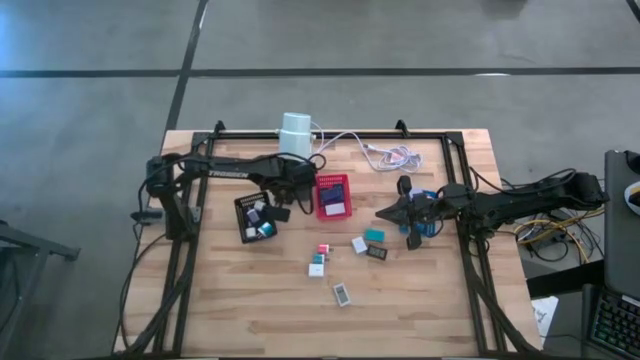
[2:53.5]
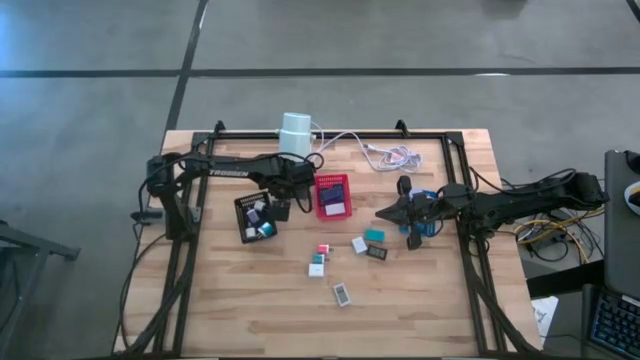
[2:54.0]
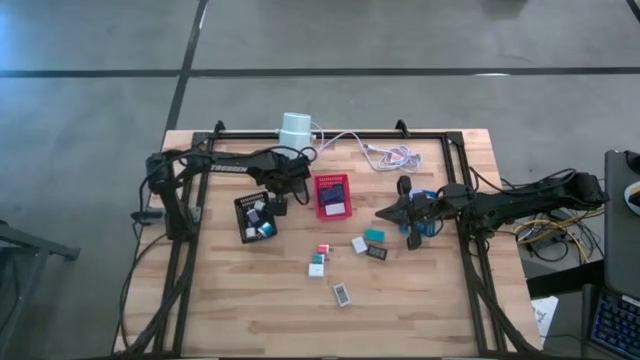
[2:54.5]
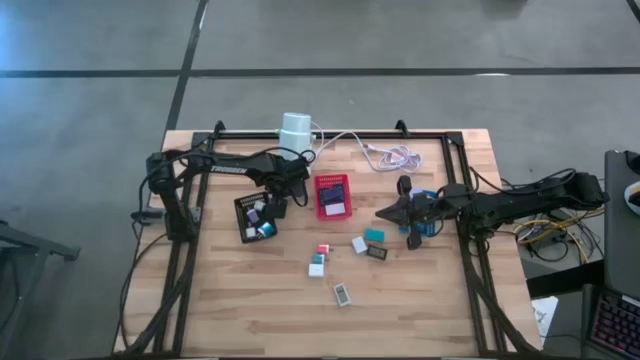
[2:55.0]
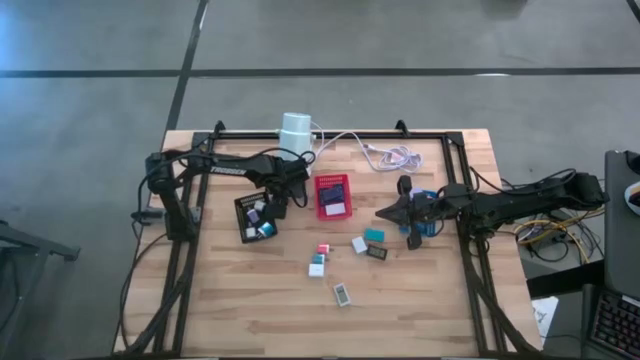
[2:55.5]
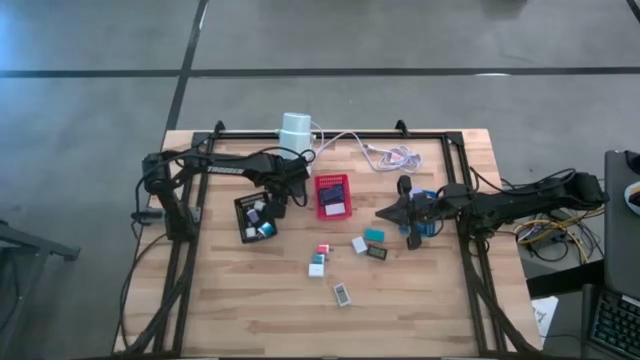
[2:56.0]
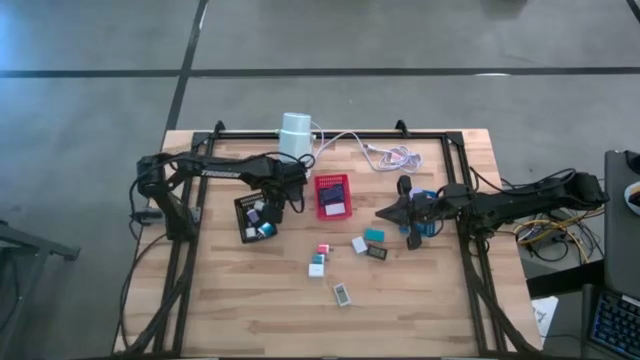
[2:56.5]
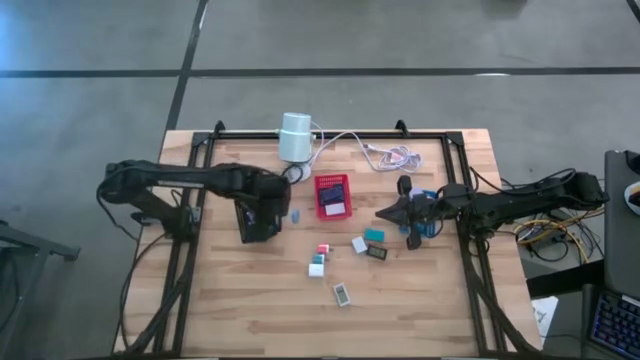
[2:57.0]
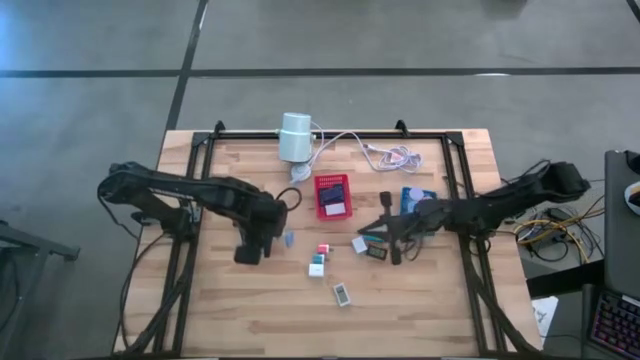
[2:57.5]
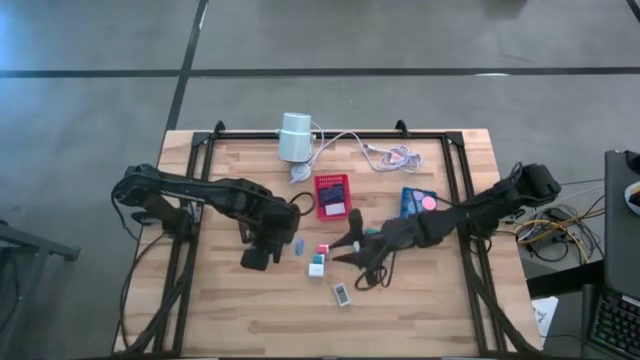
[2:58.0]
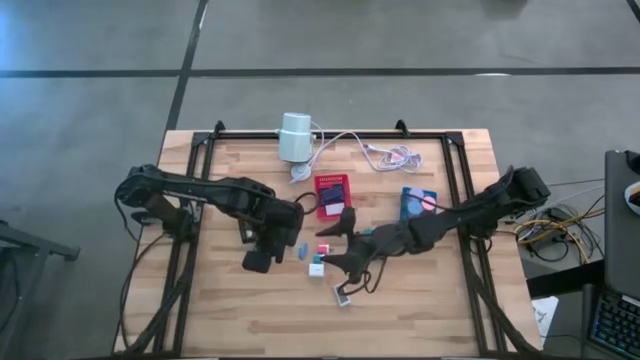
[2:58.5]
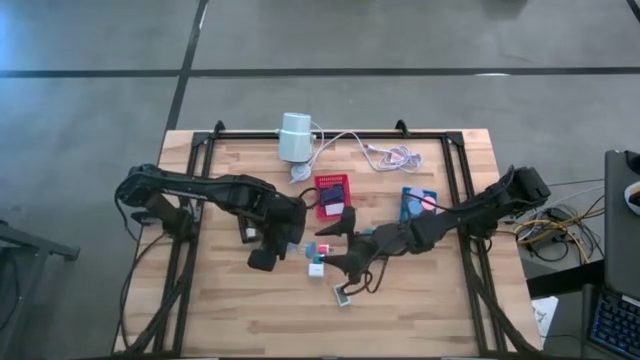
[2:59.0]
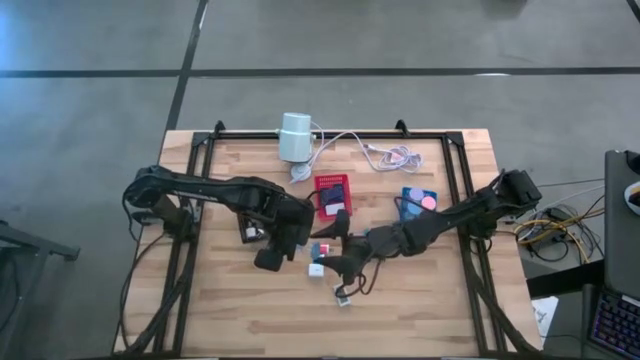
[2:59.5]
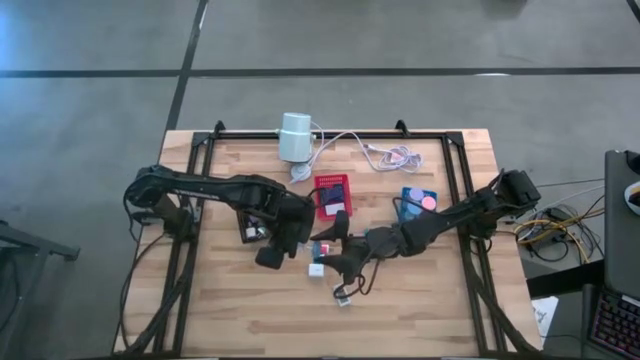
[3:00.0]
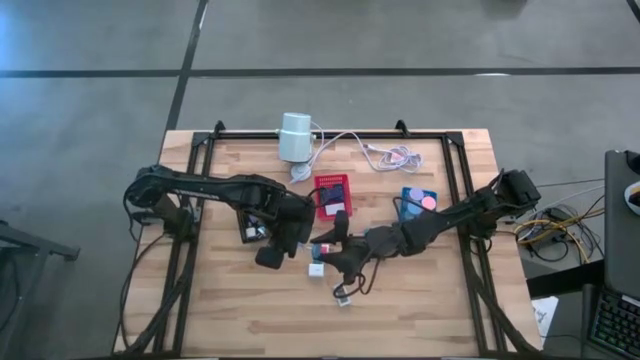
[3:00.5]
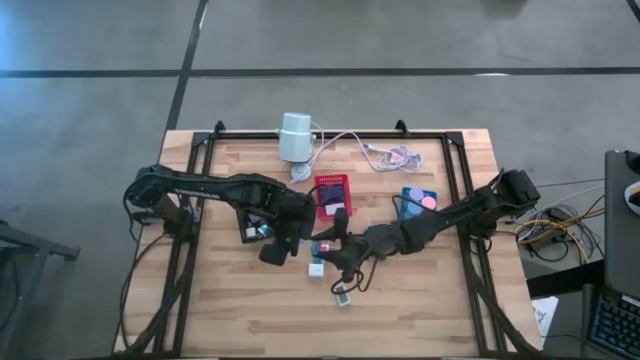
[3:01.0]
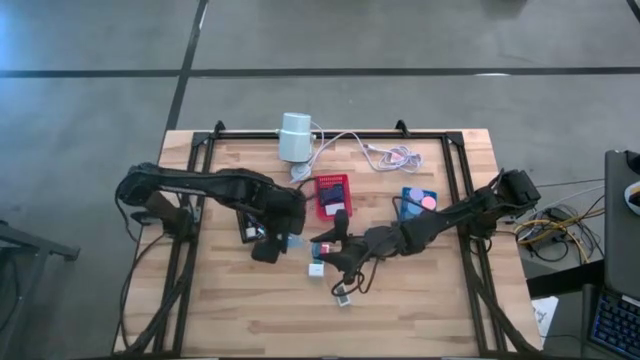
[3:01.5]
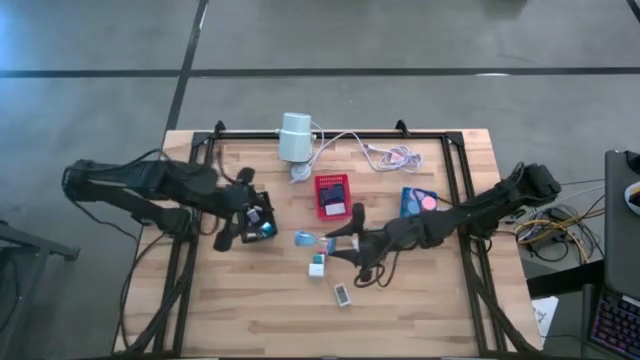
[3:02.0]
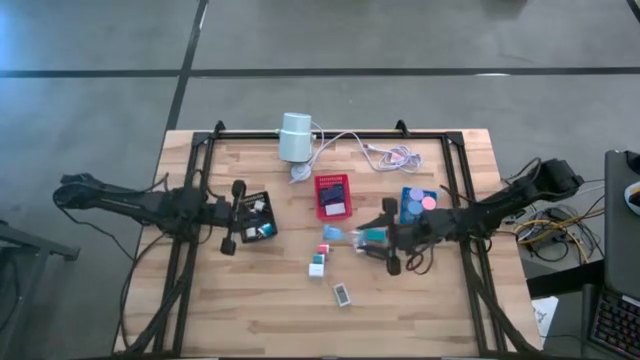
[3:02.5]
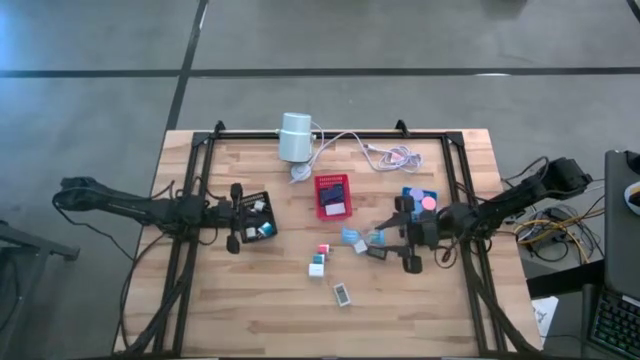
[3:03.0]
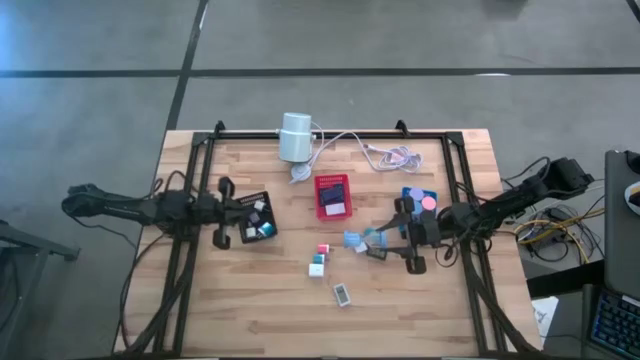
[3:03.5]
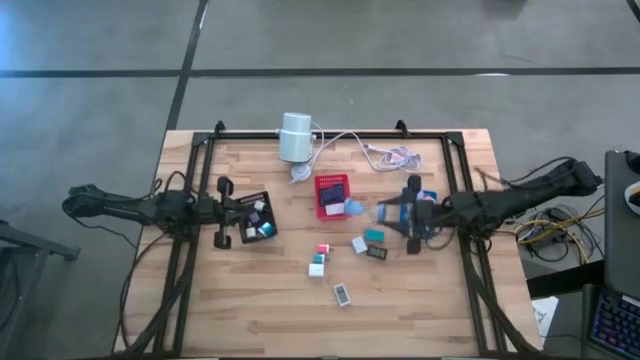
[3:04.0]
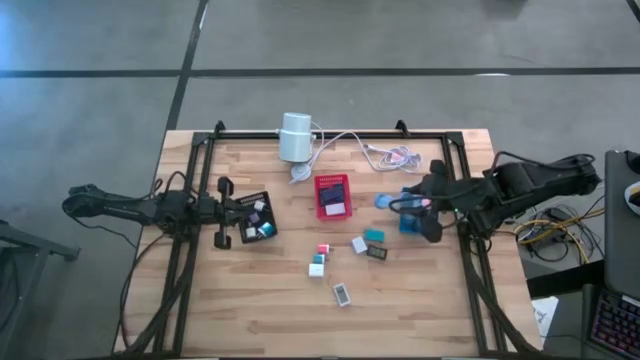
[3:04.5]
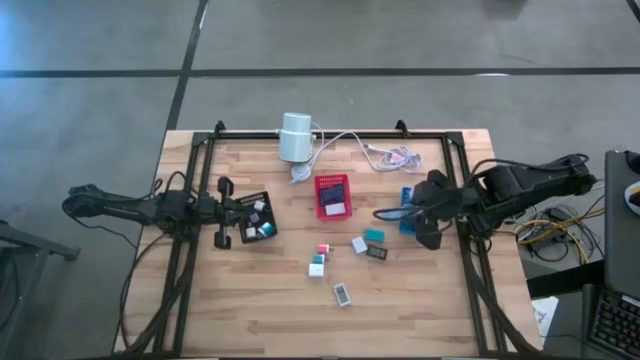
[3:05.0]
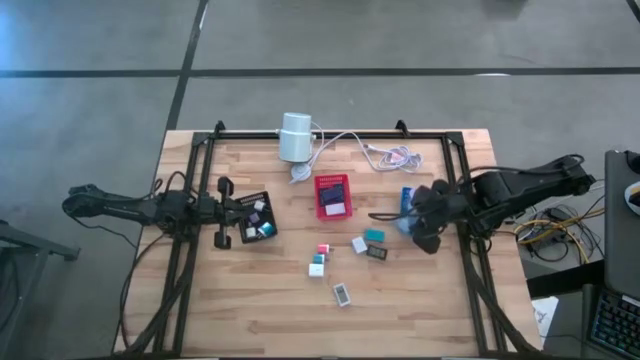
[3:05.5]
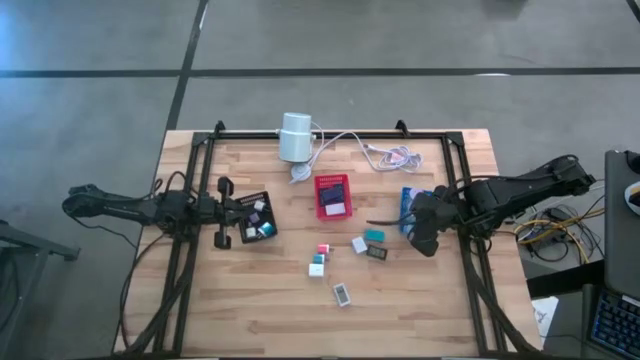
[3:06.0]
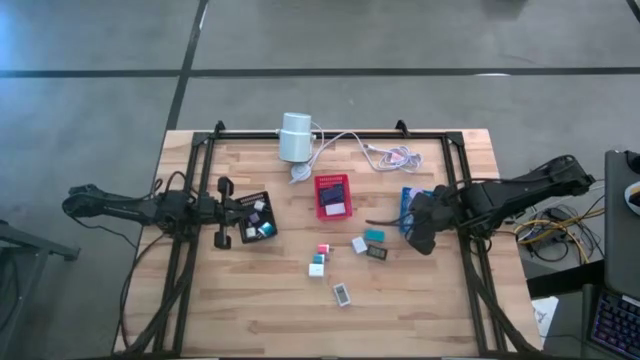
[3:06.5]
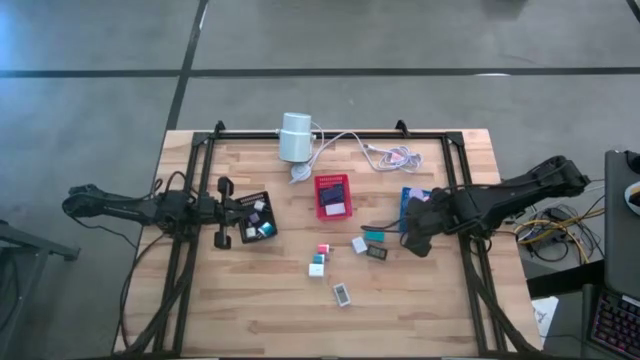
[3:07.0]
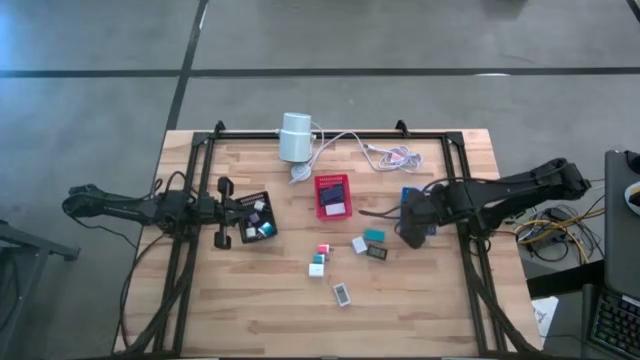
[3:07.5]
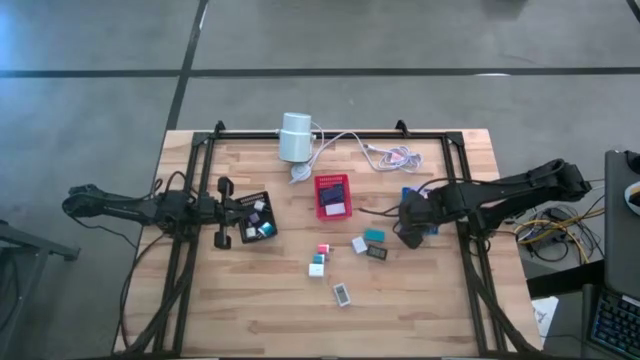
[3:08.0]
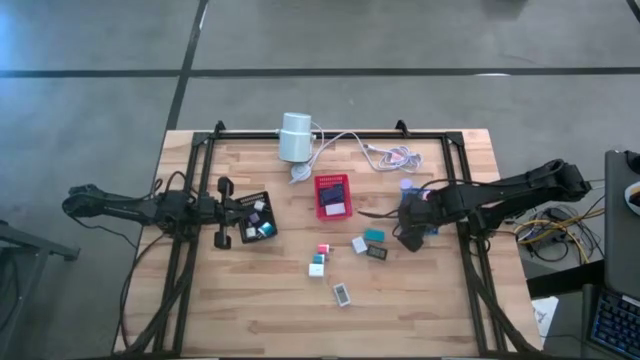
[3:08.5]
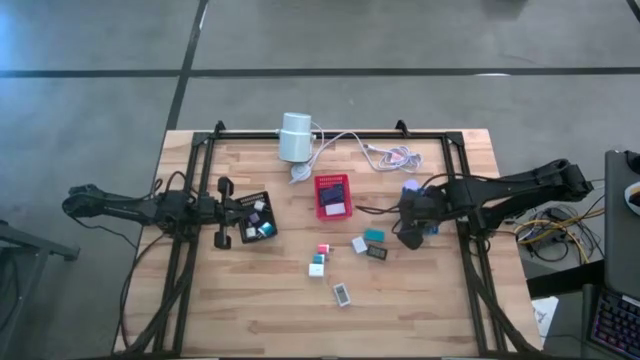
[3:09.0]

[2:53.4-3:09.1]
Task: Pick & Place Office items
Put the light blue hourglass into the blue basket

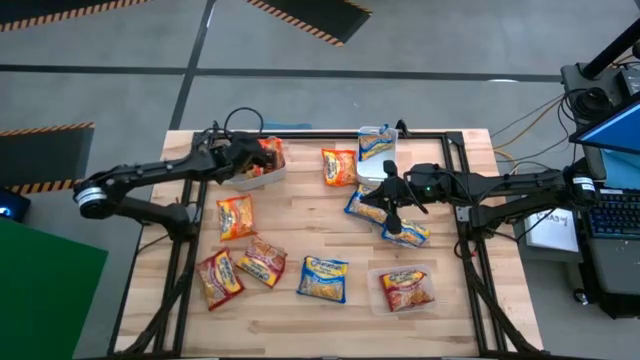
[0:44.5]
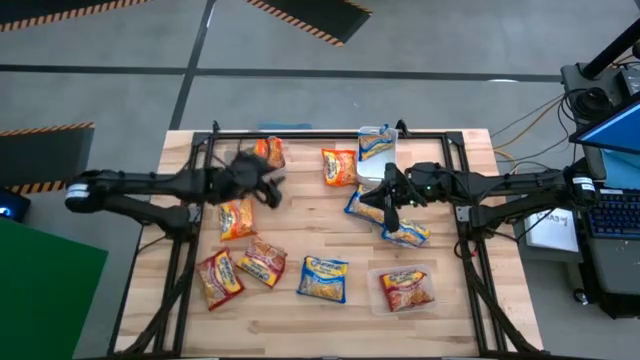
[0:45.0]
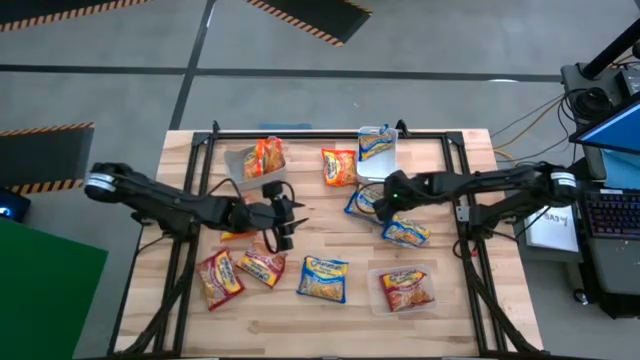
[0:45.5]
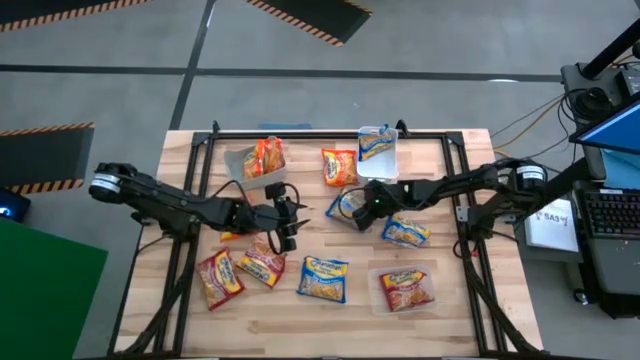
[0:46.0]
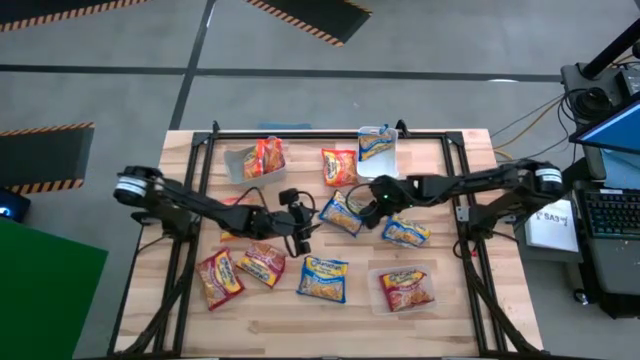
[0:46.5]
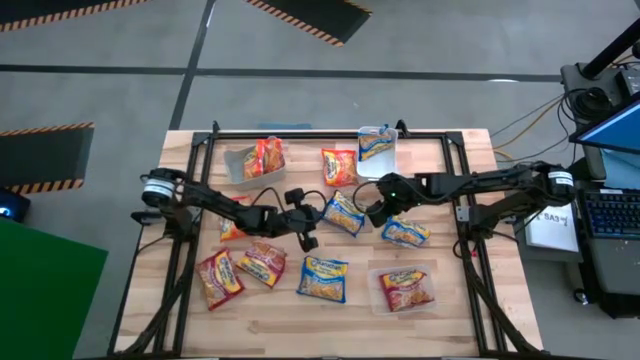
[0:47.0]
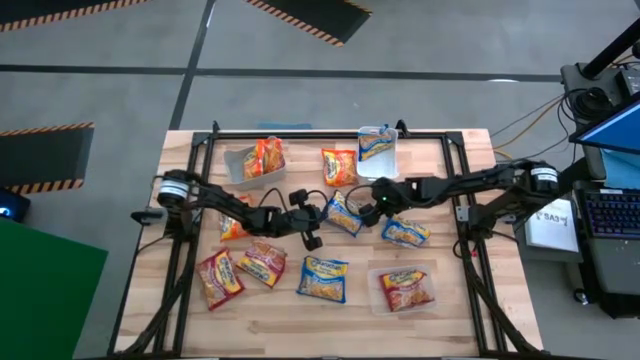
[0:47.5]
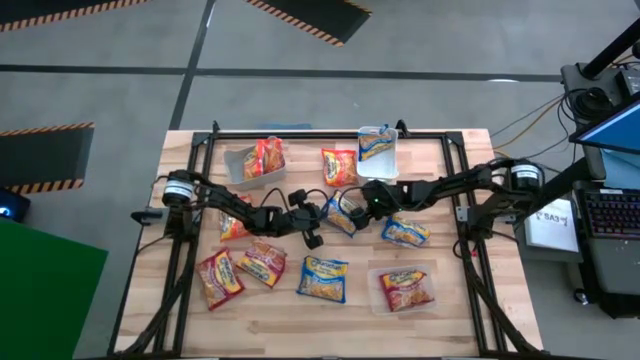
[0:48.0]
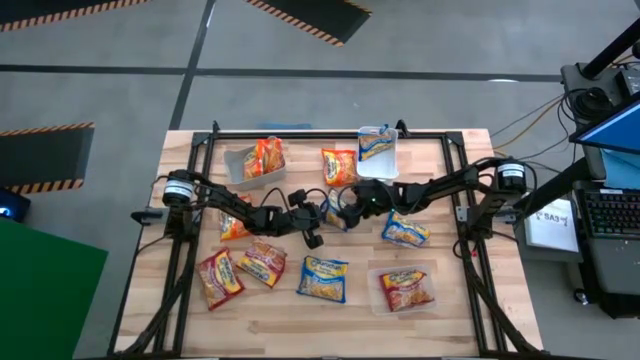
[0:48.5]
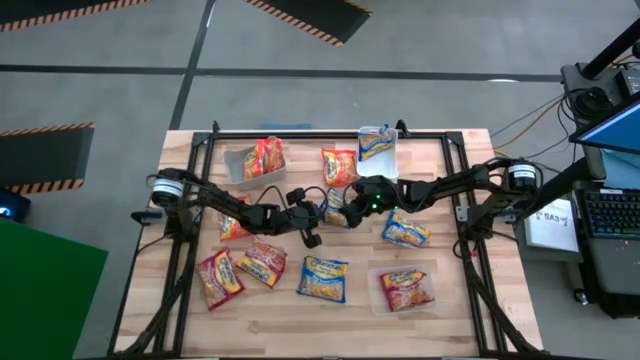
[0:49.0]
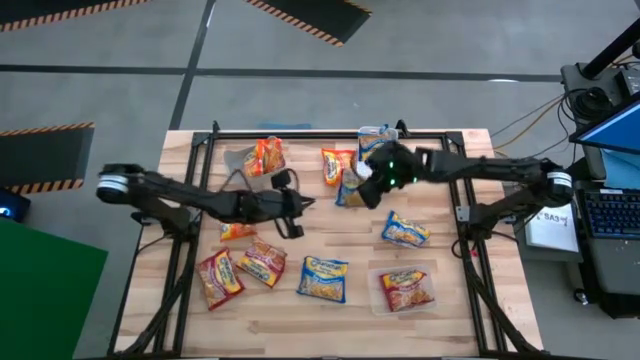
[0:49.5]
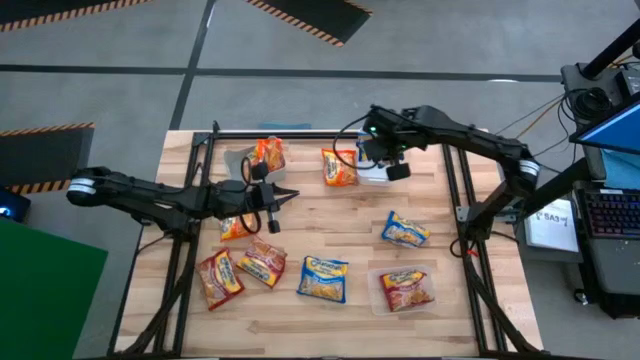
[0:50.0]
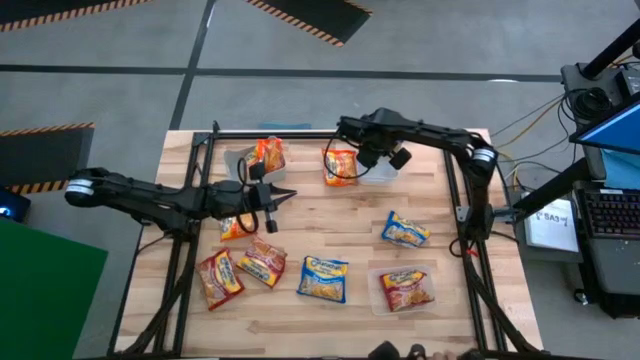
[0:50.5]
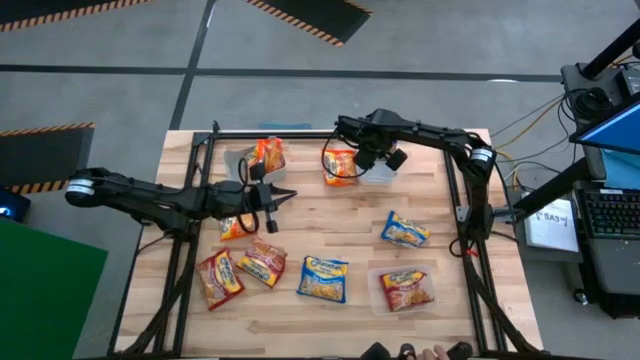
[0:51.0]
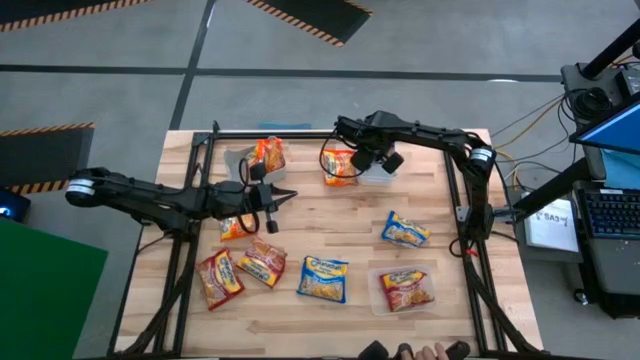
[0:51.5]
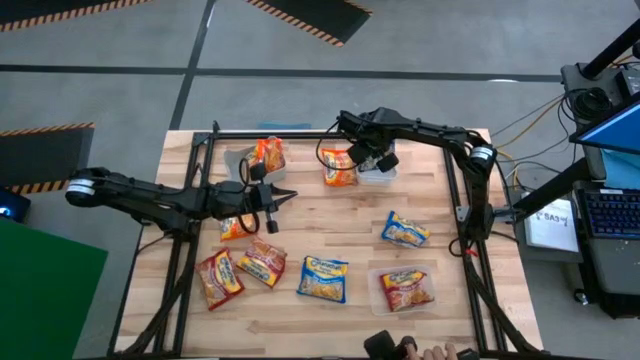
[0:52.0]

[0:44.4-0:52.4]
Task: Sort Maruchan noodles
Put the blue noodle pack into the white bin
